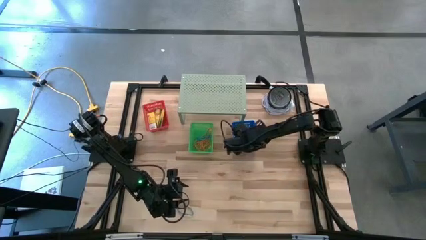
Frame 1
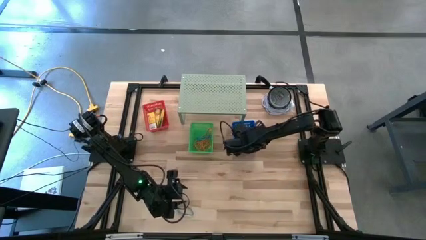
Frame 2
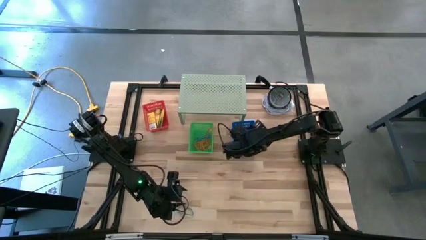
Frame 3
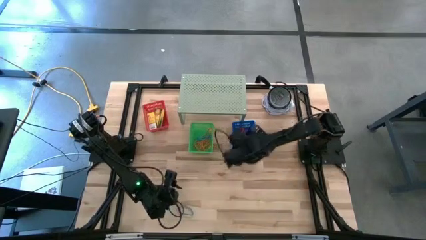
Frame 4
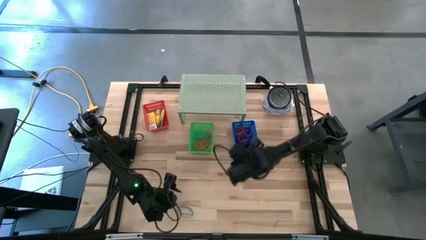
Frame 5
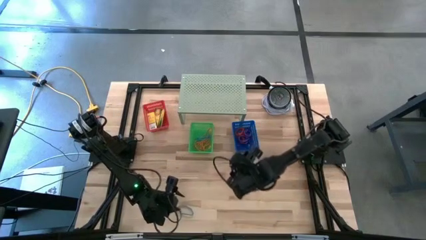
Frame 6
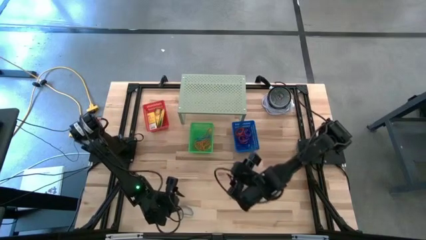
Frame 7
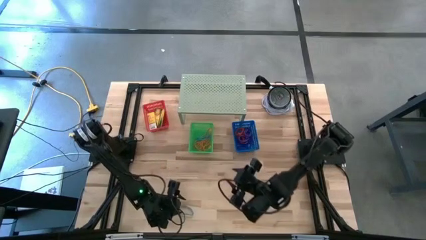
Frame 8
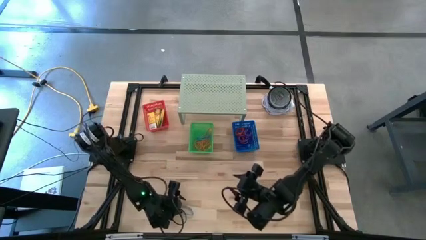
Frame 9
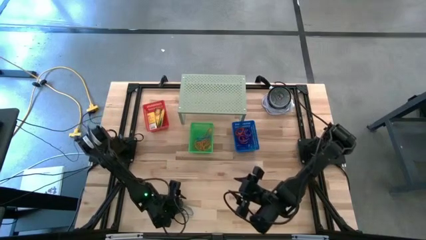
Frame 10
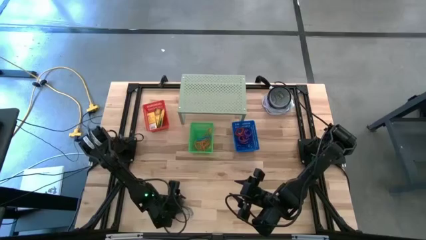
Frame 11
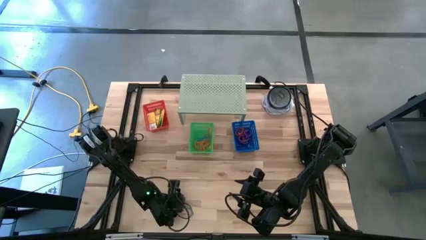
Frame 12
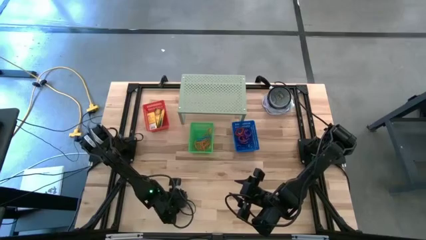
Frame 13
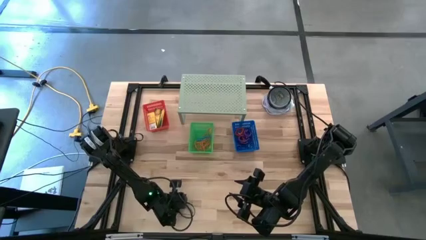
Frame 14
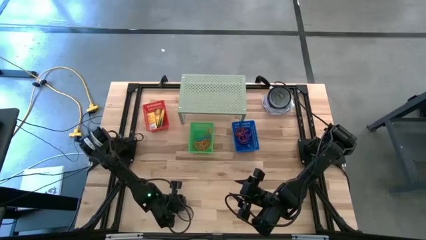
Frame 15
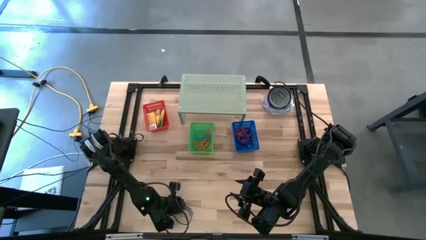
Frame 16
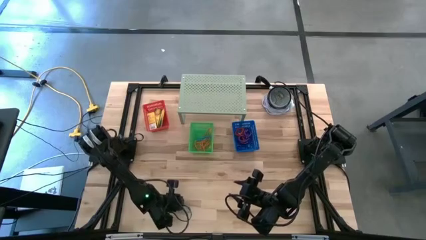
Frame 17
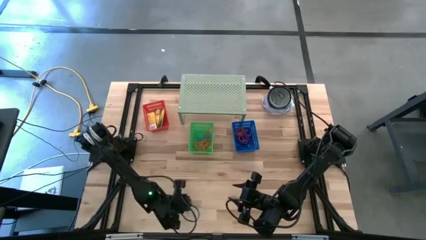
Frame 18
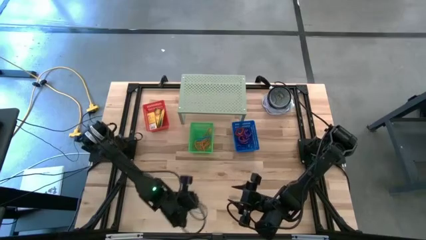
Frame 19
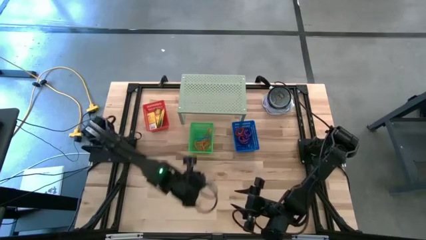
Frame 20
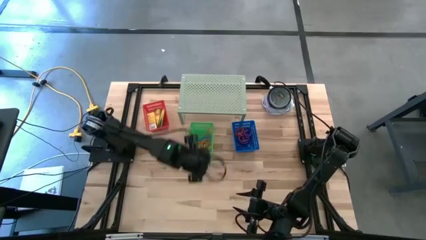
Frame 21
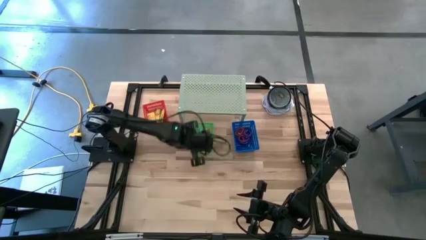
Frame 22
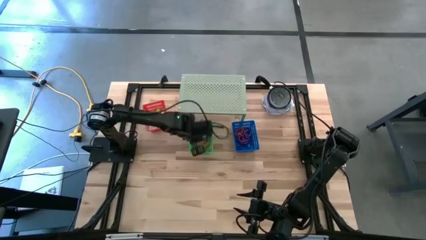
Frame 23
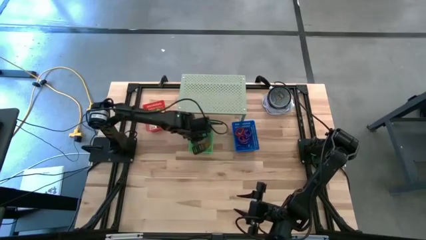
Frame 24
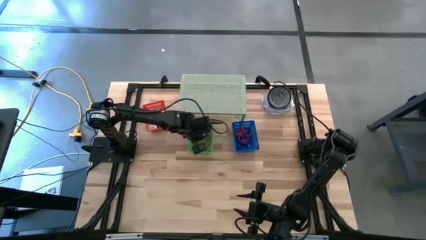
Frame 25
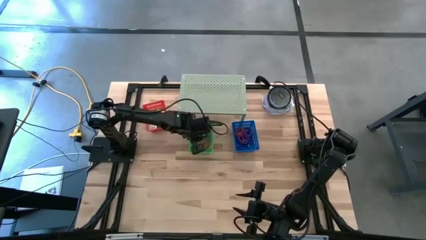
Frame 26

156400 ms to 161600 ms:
Task: Pick & Place Office Desk Supplies
Put the blue rubber band into the green bin

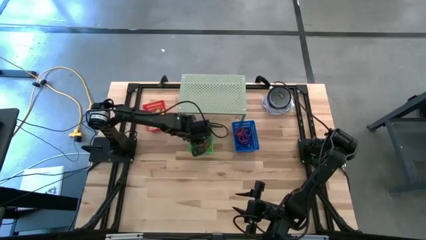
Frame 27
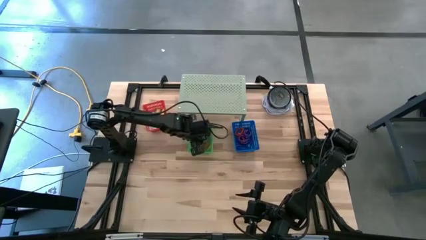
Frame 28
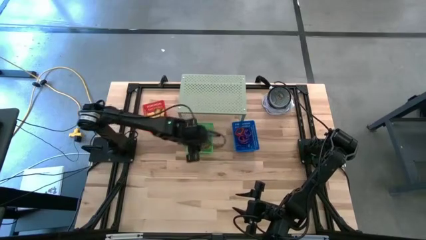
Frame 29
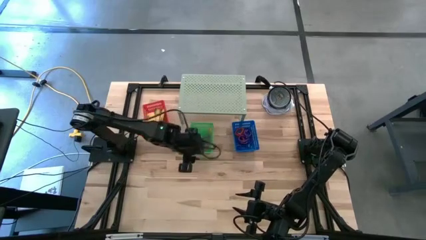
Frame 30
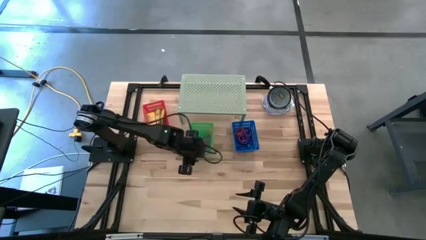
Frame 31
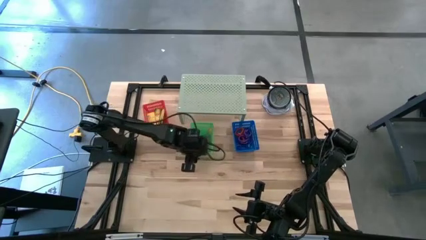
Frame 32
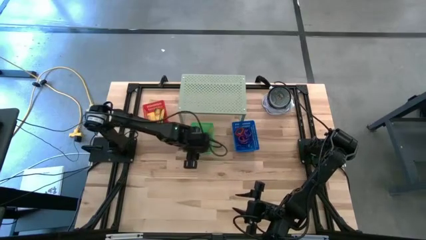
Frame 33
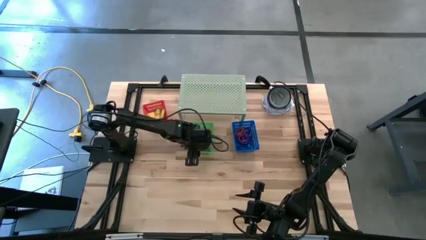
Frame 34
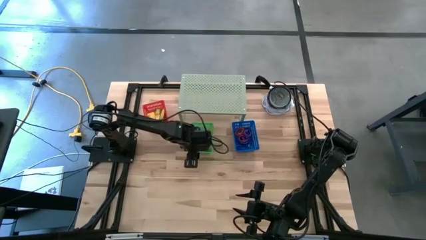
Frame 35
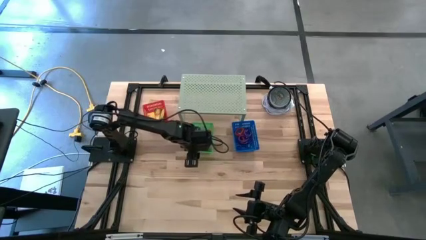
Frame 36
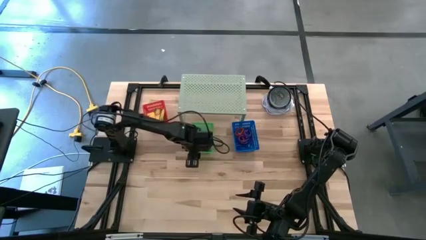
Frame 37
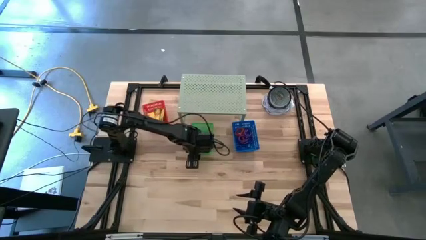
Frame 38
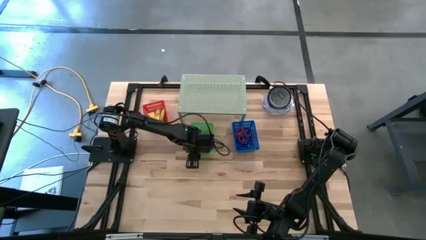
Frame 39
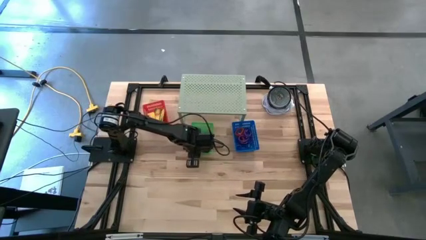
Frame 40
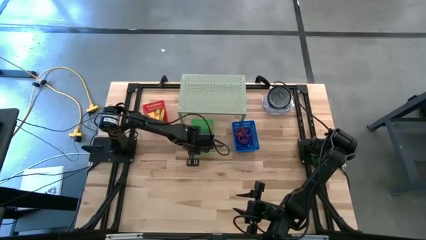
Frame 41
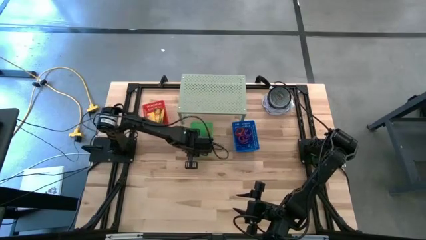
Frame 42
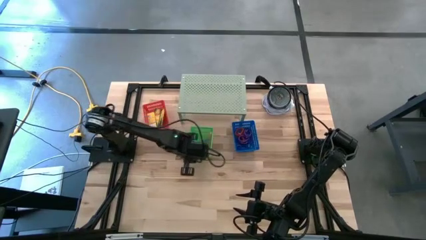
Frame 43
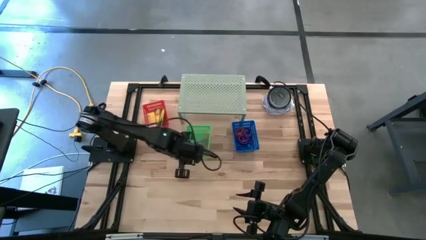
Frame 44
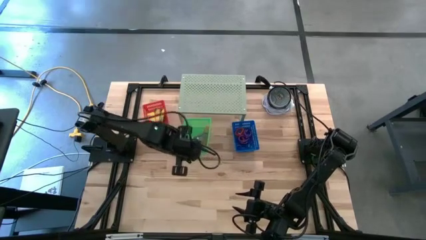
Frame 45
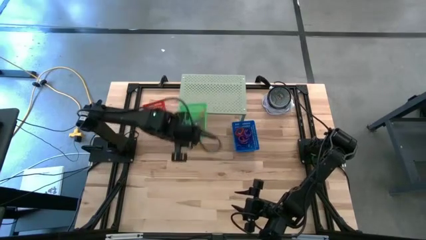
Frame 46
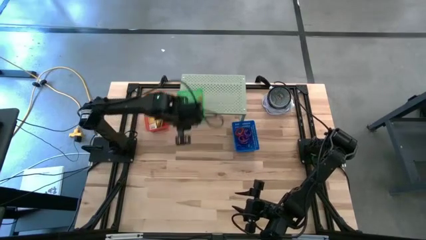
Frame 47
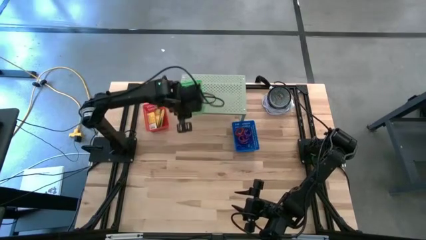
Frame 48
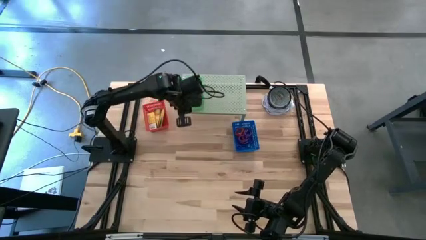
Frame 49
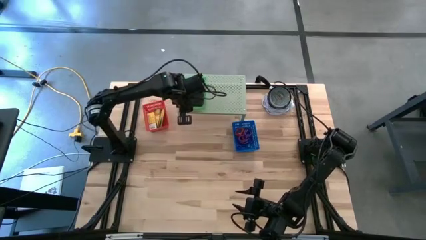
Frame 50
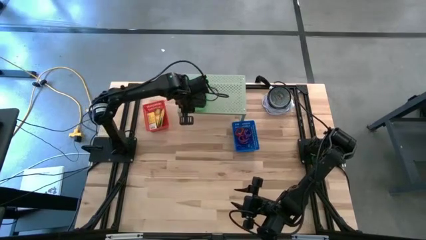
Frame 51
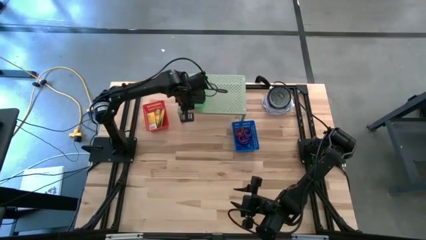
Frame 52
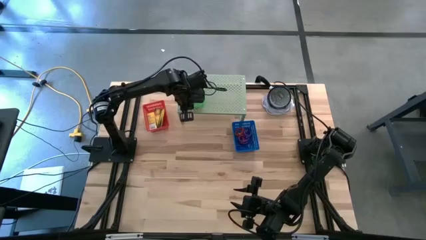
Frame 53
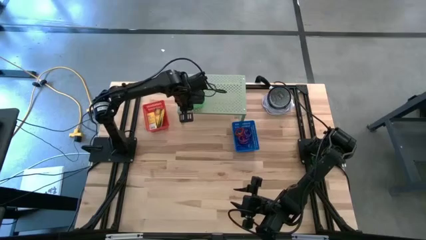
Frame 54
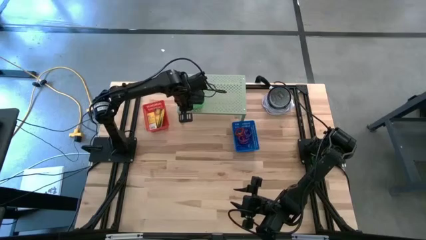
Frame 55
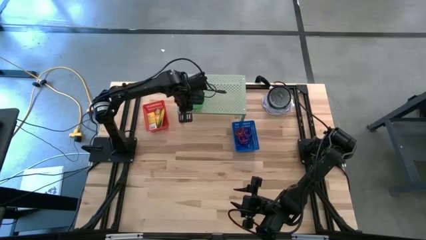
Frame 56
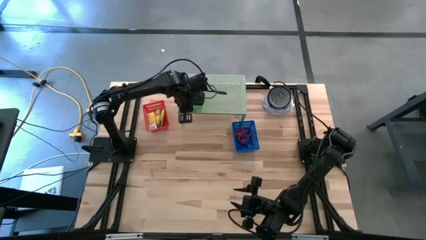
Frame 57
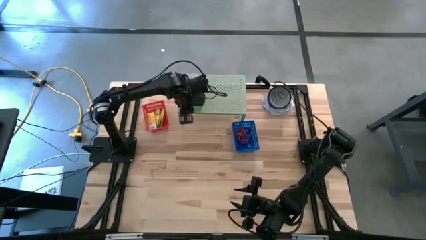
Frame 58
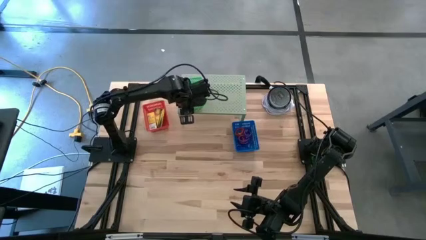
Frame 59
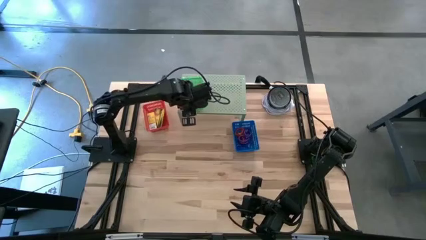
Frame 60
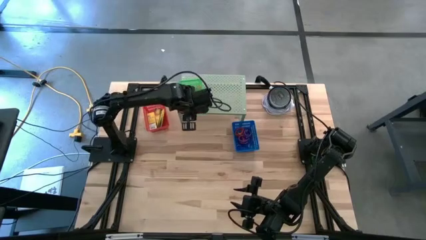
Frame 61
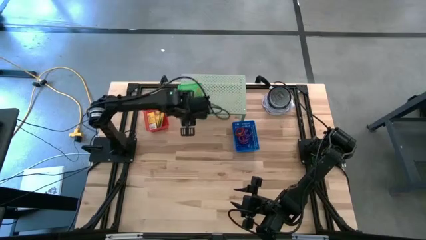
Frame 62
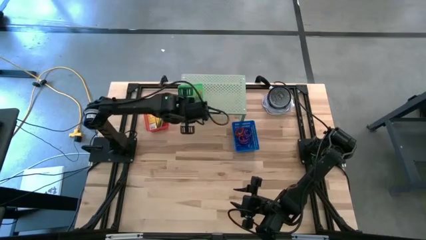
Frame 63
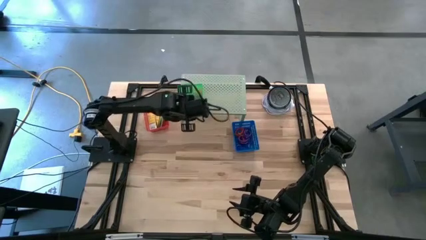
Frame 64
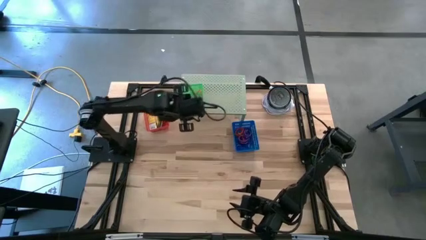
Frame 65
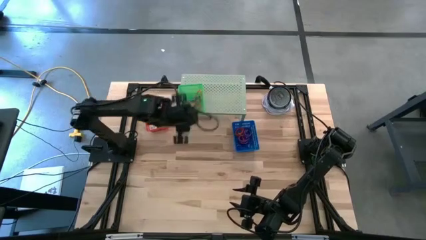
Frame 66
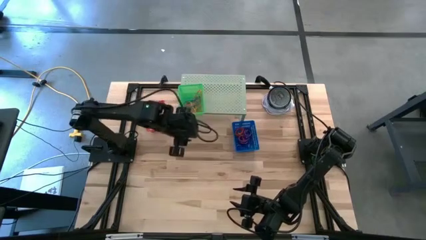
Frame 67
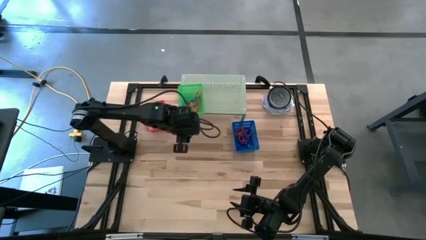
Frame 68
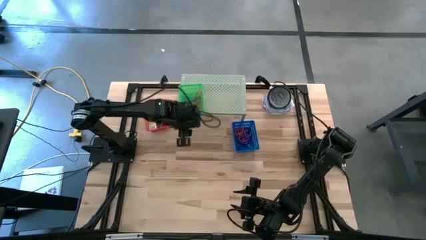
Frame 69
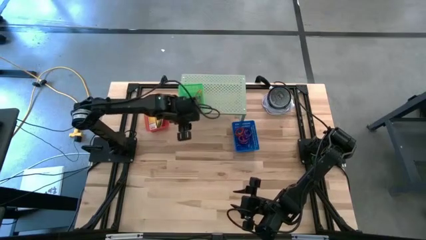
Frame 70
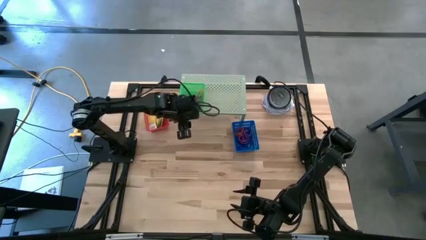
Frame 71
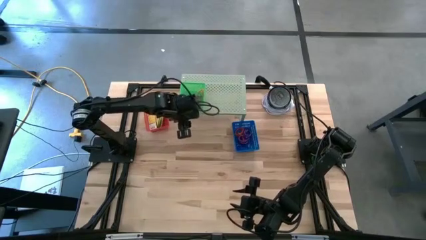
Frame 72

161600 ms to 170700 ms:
Put the green bin on the shelf

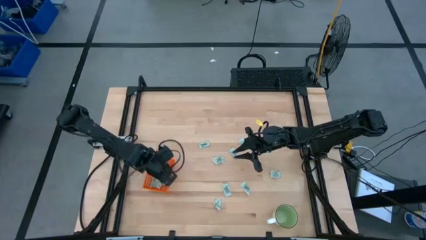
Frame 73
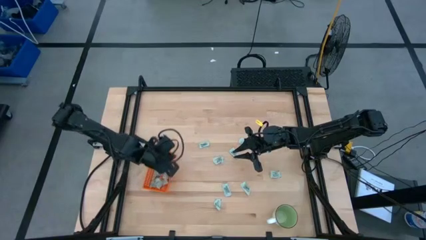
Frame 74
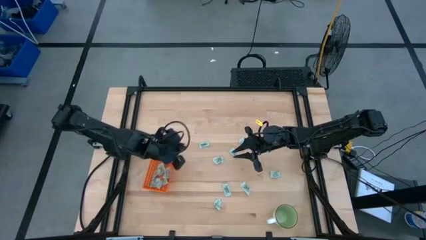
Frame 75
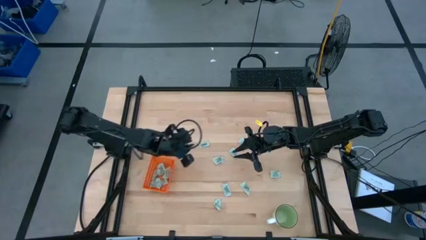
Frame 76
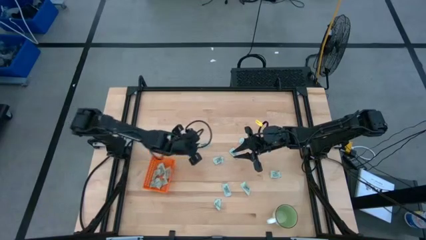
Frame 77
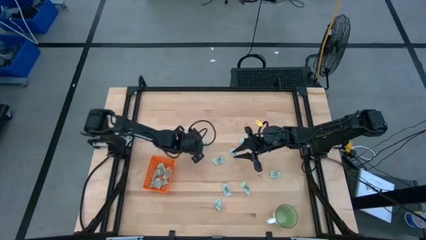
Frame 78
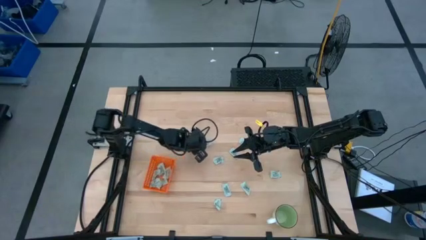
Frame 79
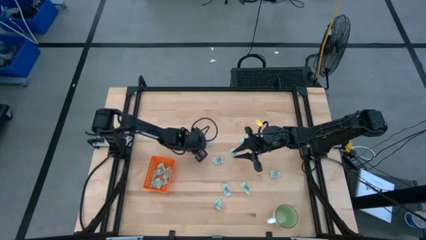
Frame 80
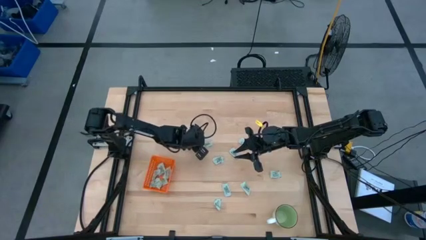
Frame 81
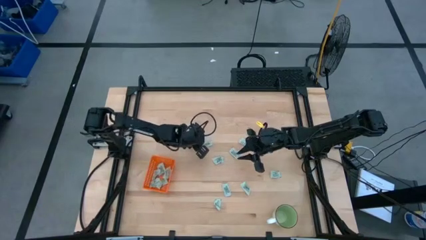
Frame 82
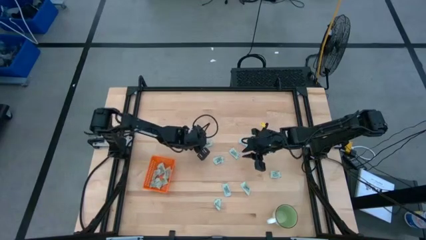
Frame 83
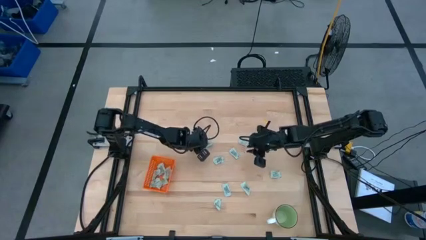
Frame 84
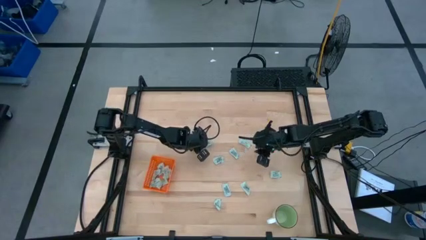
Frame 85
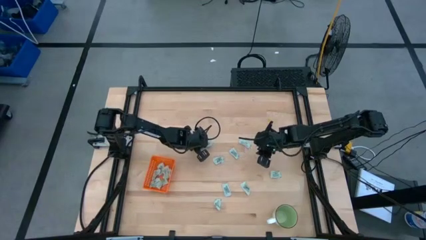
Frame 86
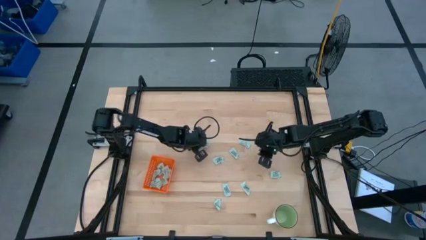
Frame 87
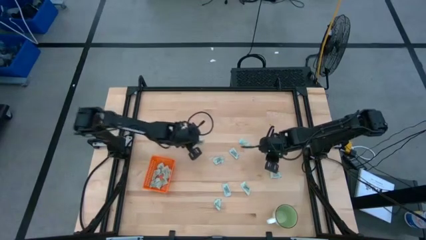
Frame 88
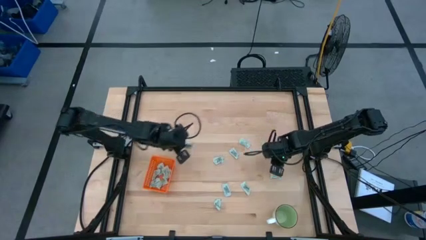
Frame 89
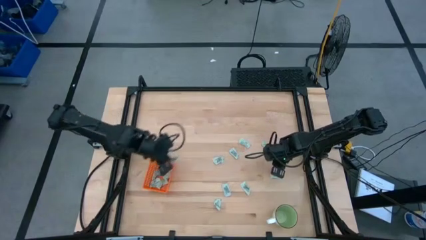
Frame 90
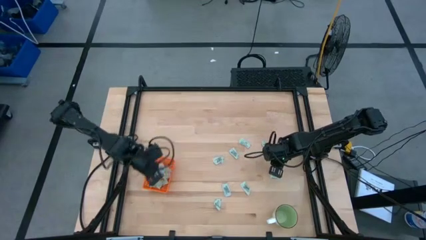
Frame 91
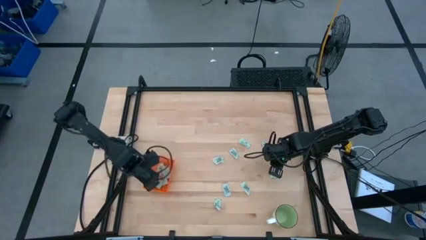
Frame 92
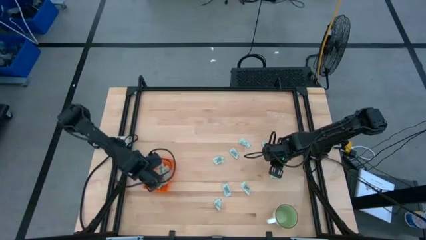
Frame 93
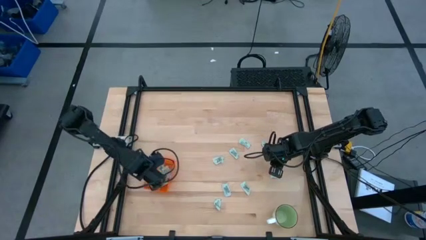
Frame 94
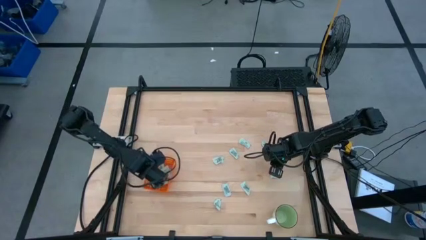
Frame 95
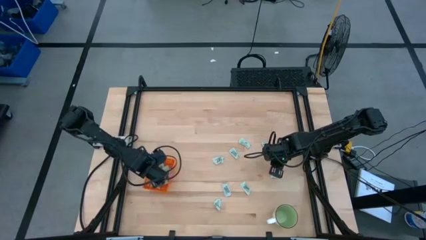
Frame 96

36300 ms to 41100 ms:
Task: Pick and place Stevia / Truvia into bins
Put the white stevia packet into the orange bin
